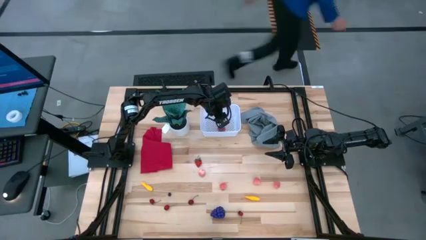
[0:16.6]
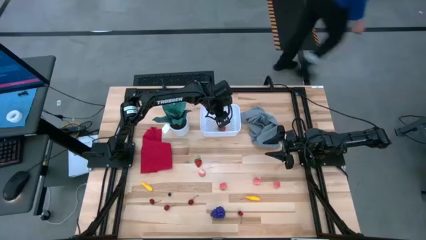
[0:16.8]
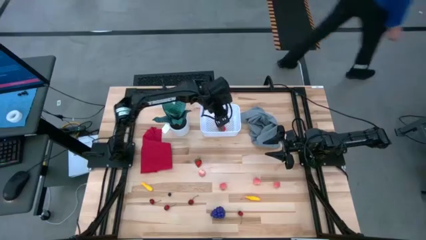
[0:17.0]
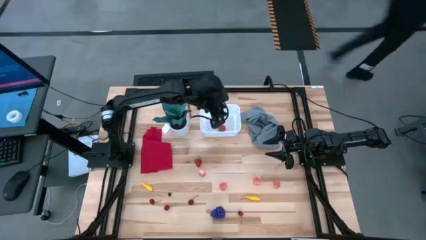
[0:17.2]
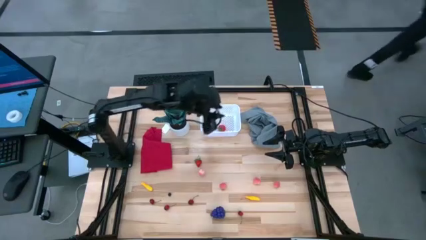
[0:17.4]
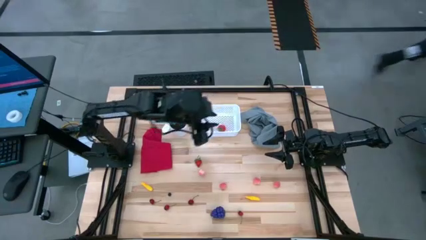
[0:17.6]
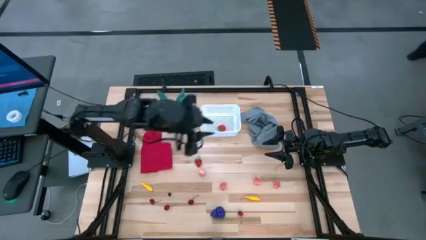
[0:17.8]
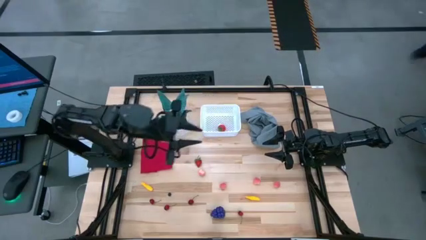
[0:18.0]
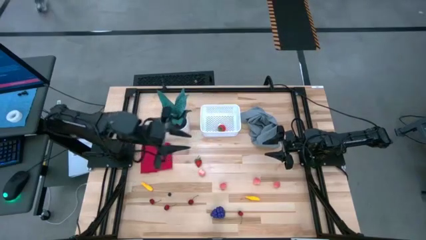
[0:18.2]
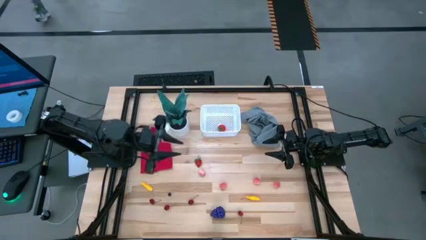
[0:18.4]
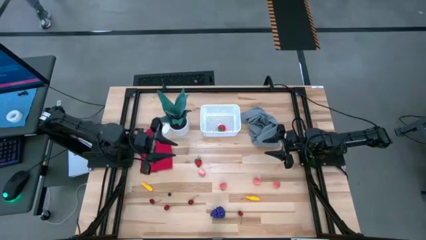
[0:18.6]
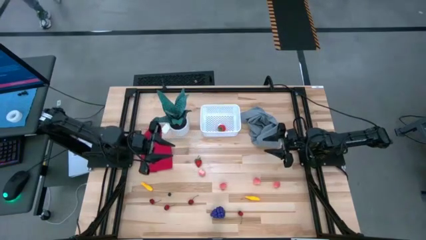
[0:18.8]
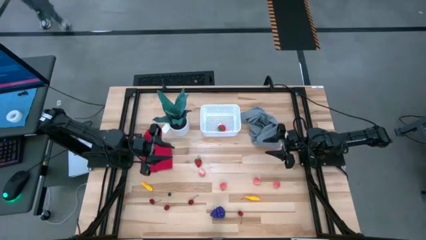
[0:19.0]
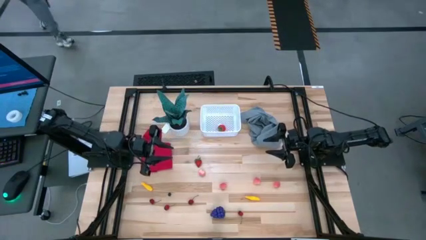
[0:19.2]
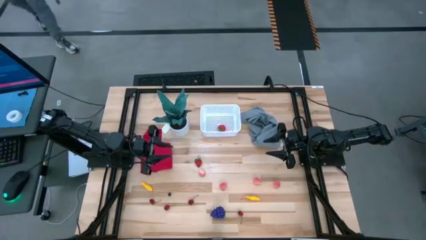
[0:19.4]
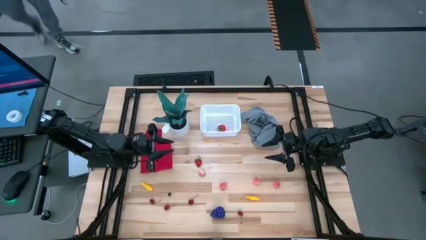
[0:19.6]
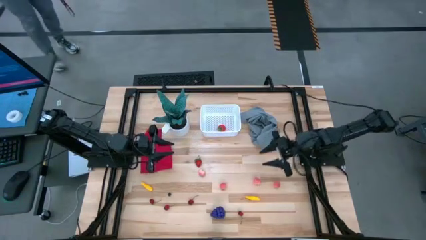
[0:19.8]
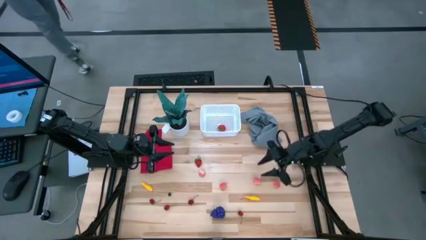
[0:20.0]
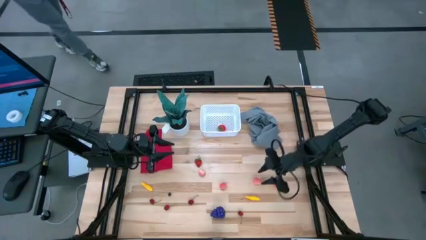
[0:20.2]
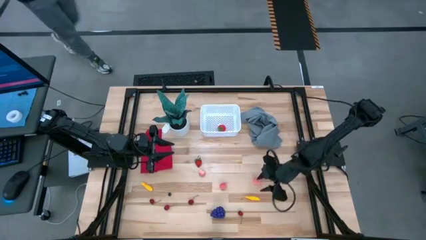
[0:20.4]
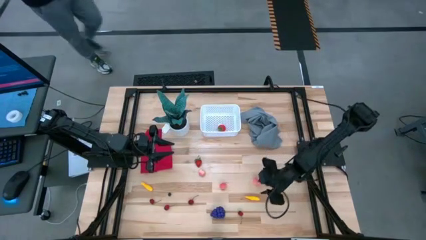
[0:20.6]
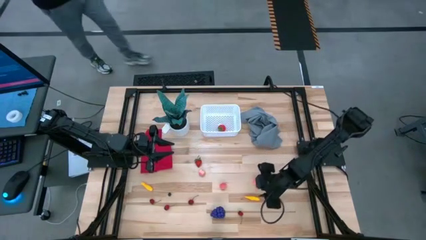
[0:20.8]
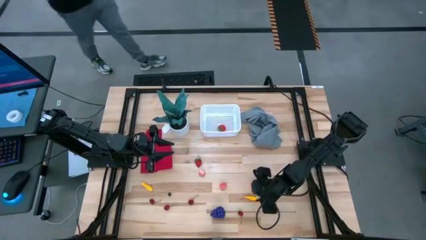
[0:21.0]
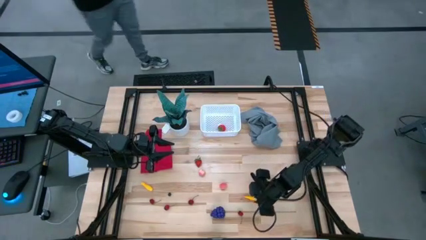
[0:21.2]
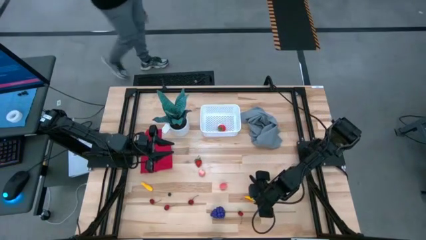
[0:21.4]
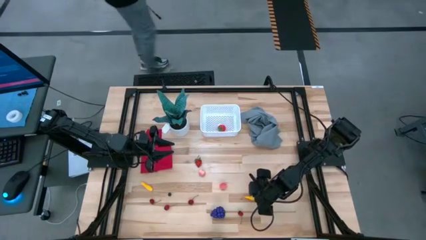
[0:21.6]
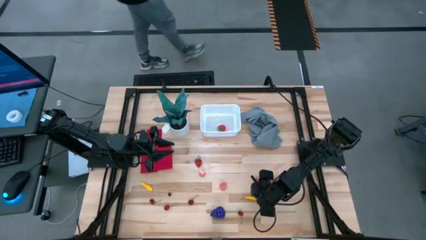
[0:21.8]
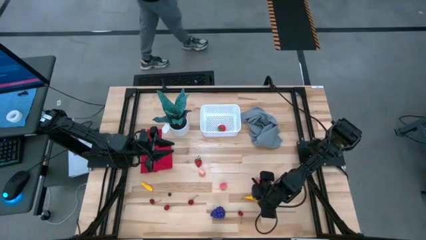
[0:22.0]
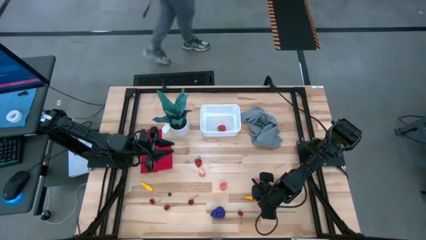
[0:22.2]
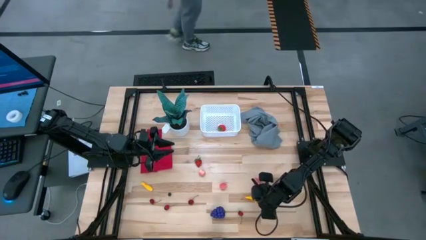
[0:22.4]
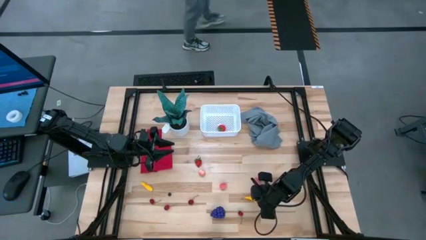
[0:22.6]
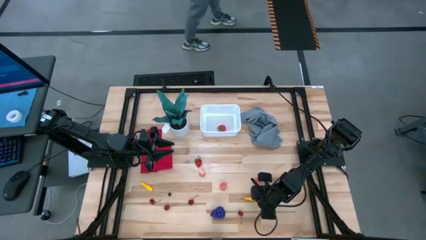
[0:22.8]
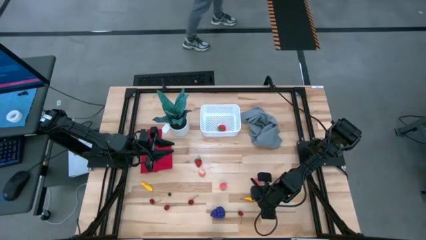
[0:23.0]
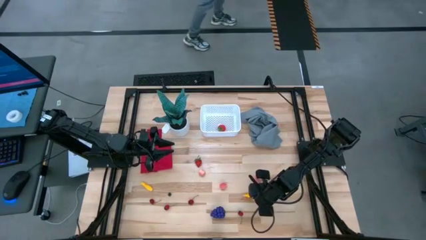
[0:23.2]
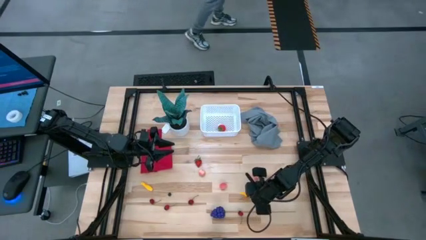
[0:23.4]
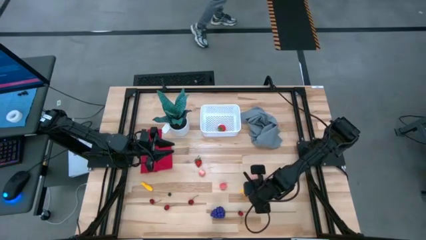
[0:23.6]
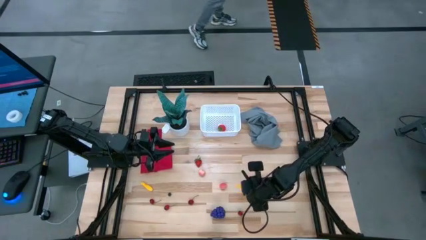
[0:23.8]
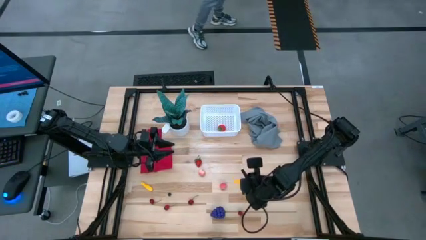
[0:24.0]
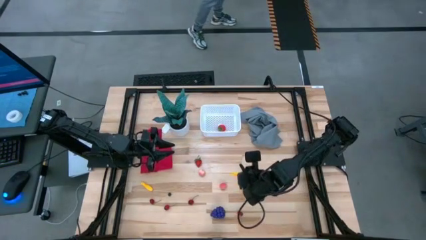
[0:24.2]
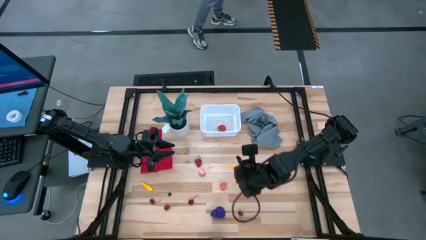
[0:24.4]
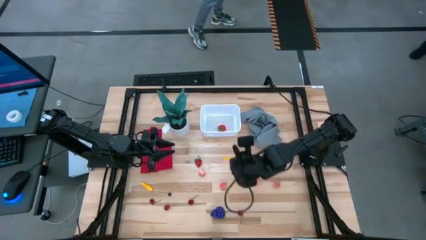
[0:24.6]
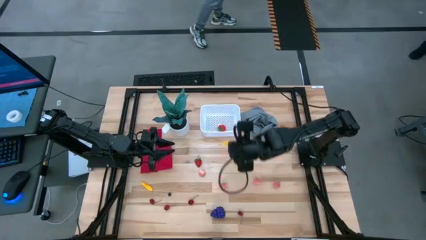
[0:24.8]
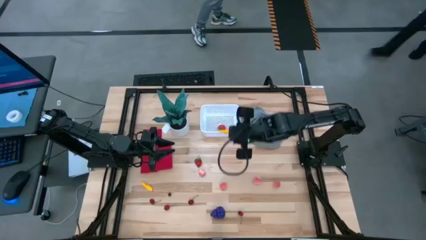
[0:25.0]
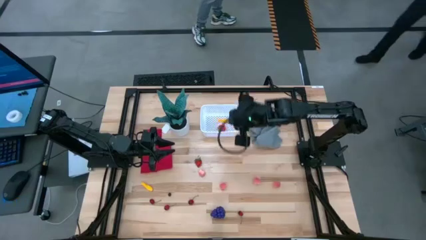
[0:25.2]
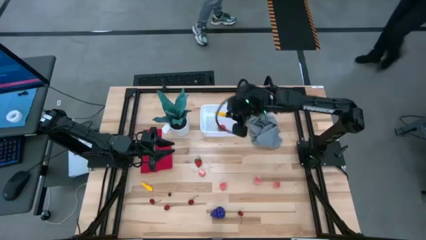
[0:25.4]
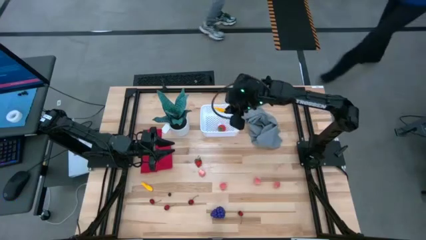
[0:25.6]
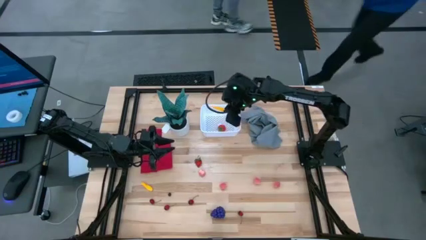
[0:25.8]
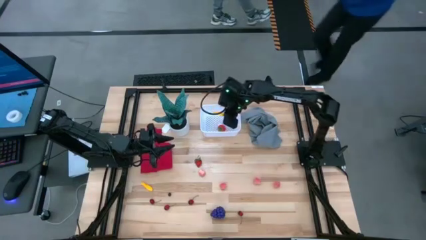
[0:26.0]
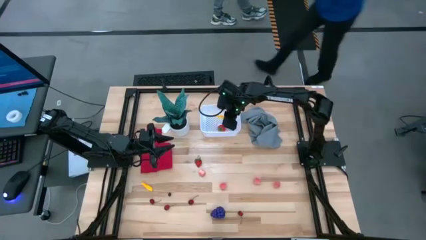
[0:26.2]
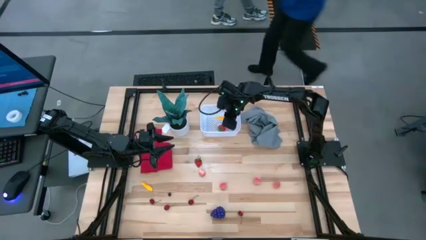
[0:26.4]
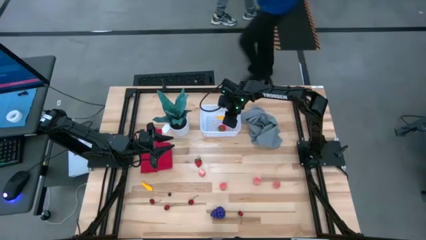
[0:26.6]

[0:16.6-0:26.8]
Task: Pick and placing Produce into tupperware
Put the yellow corn into the white bin
